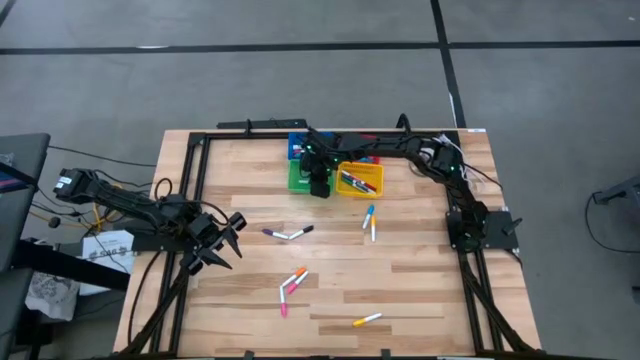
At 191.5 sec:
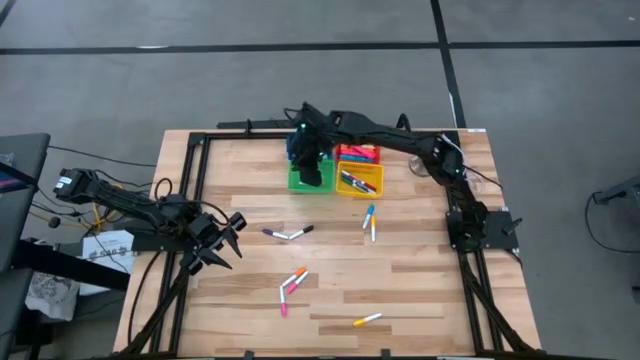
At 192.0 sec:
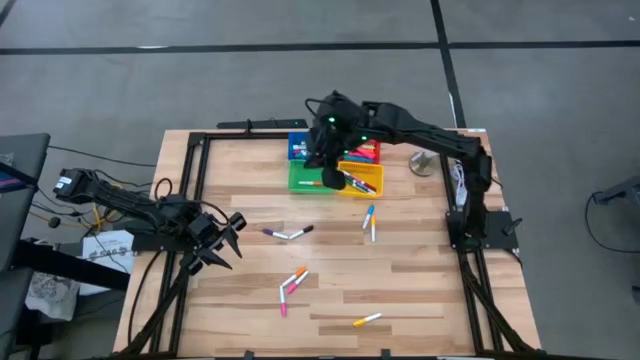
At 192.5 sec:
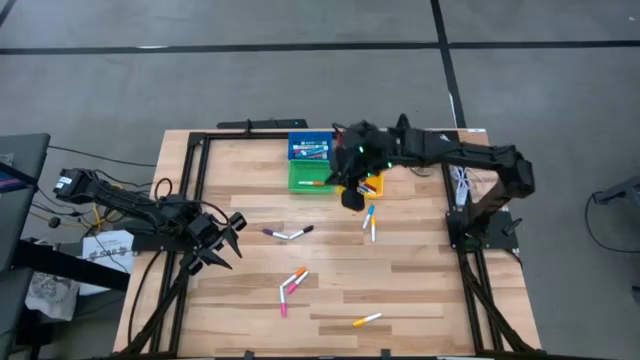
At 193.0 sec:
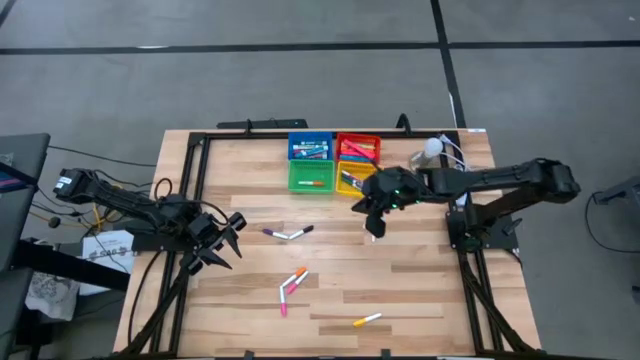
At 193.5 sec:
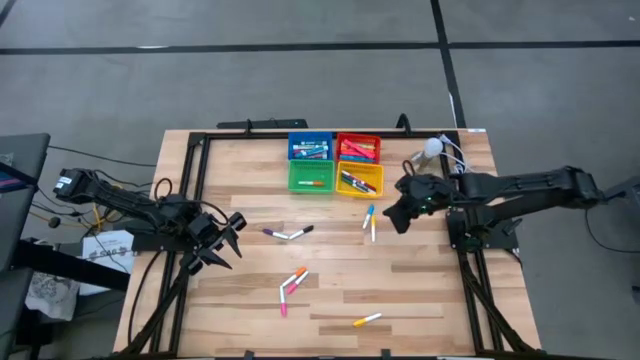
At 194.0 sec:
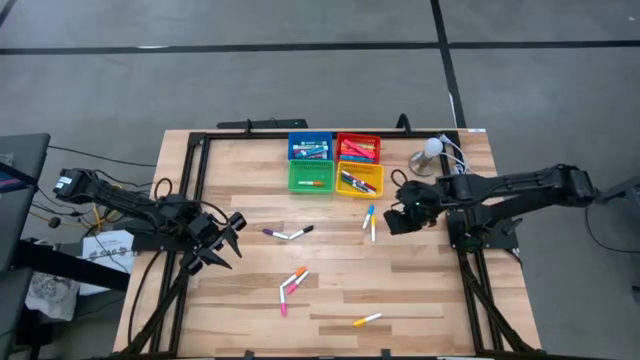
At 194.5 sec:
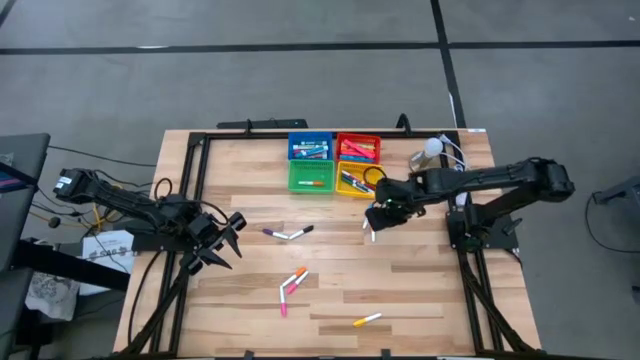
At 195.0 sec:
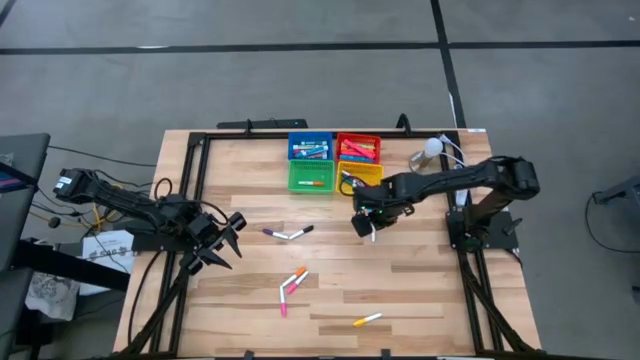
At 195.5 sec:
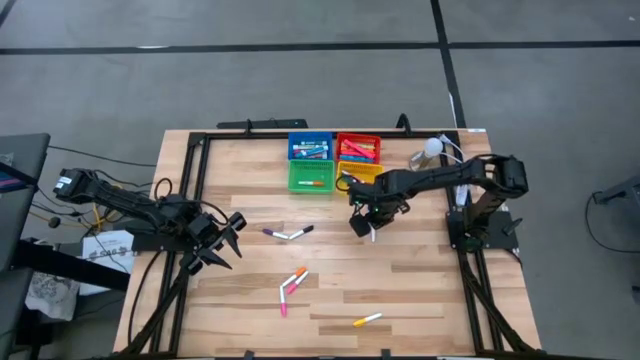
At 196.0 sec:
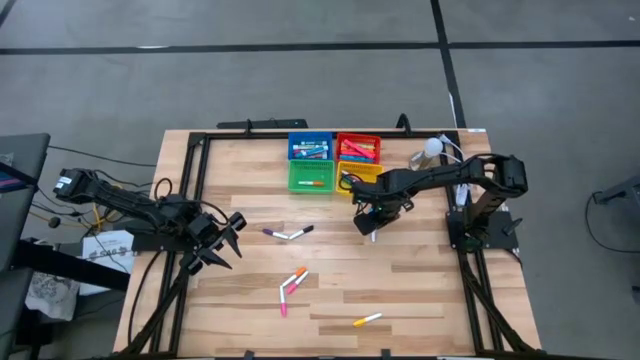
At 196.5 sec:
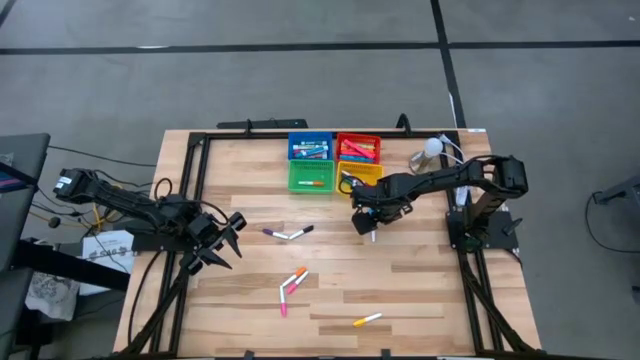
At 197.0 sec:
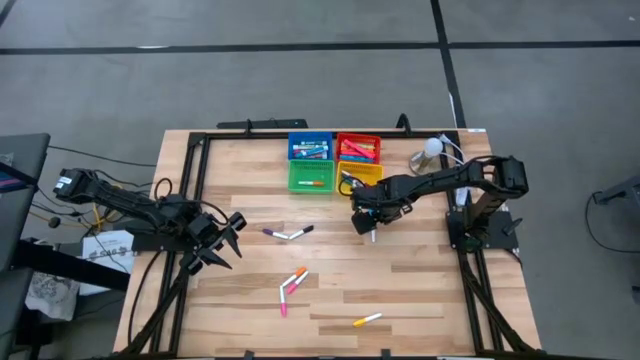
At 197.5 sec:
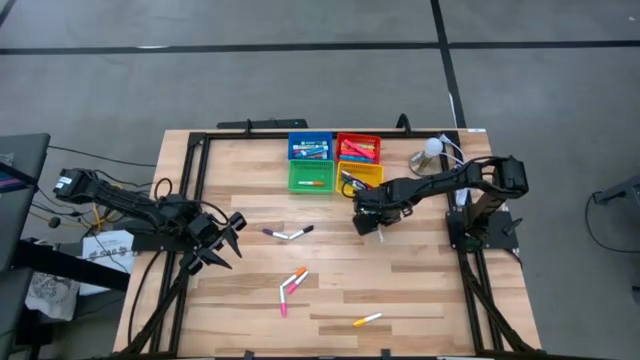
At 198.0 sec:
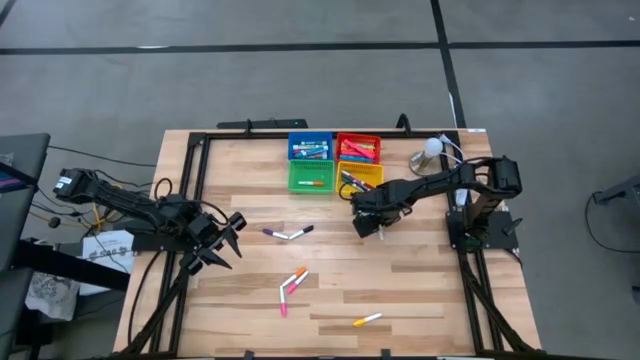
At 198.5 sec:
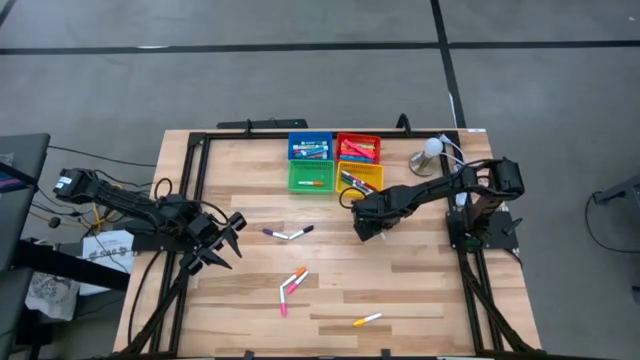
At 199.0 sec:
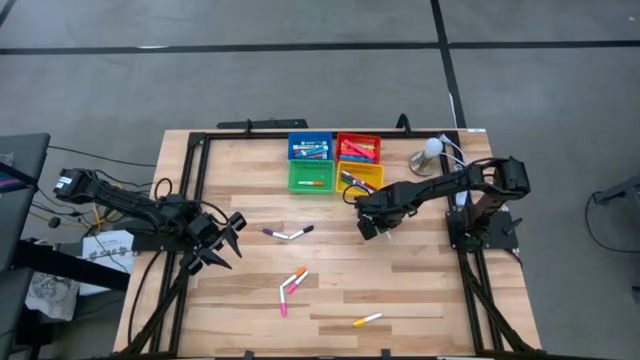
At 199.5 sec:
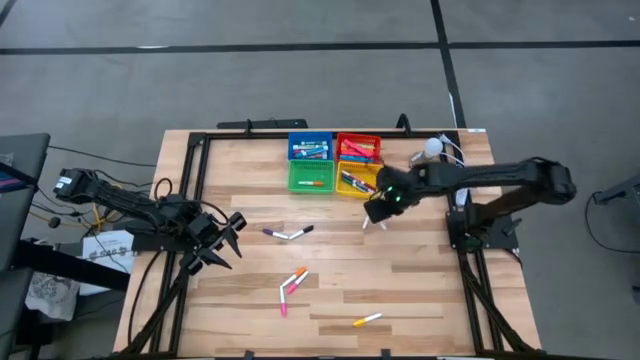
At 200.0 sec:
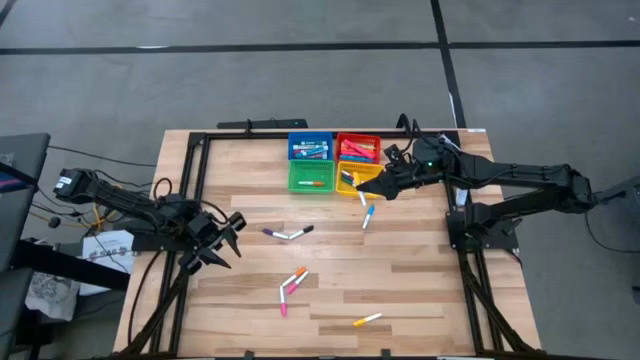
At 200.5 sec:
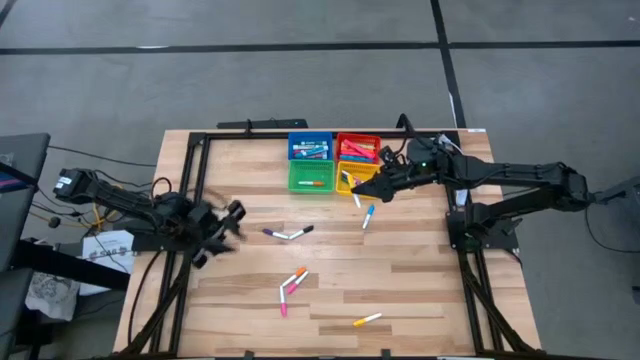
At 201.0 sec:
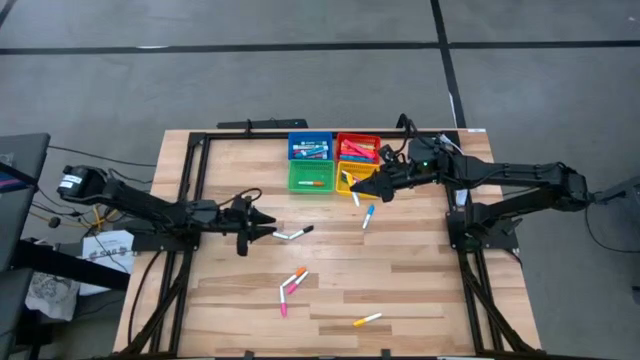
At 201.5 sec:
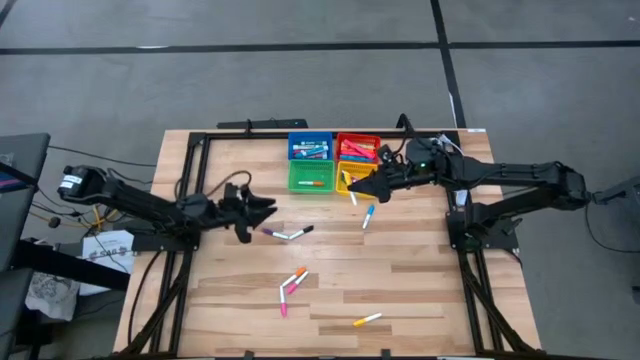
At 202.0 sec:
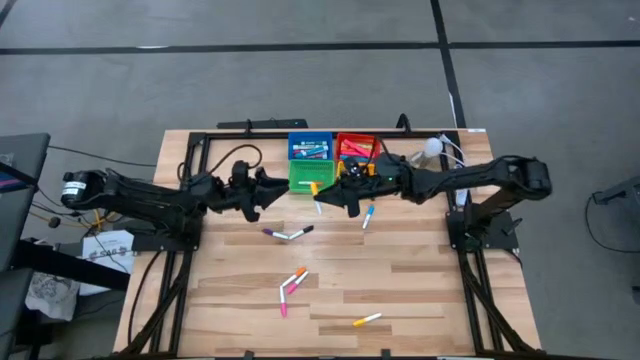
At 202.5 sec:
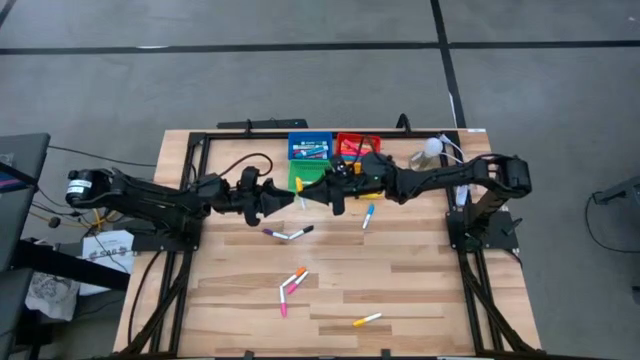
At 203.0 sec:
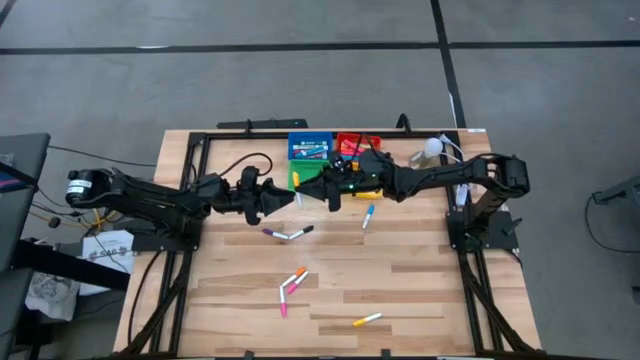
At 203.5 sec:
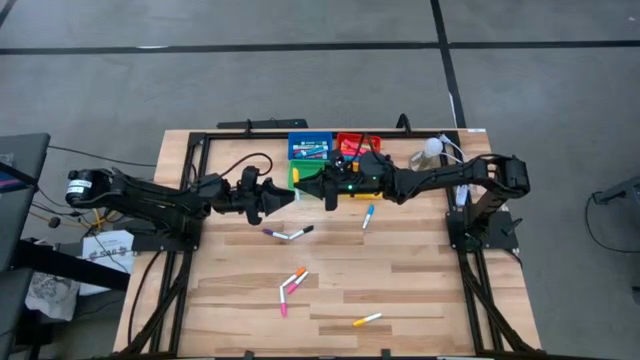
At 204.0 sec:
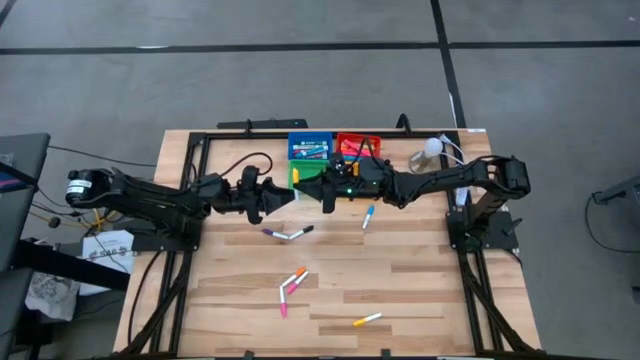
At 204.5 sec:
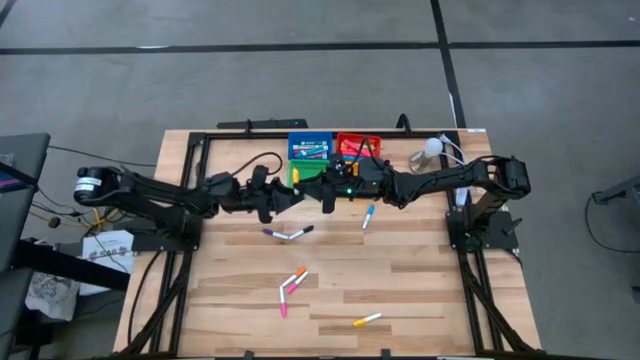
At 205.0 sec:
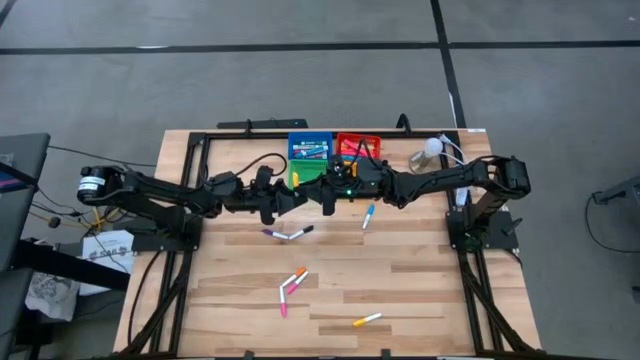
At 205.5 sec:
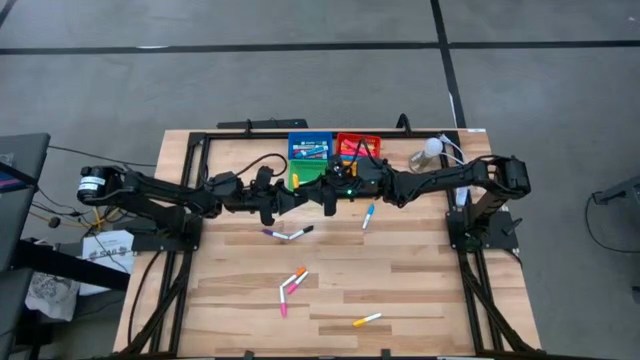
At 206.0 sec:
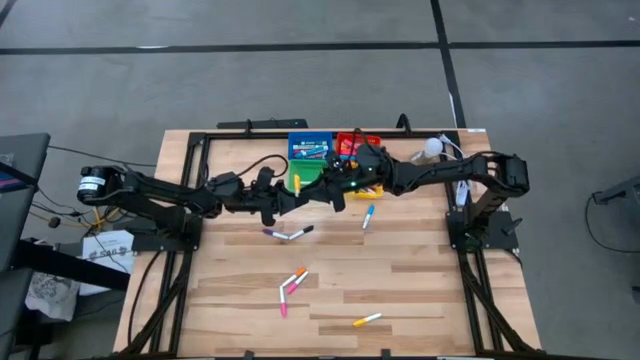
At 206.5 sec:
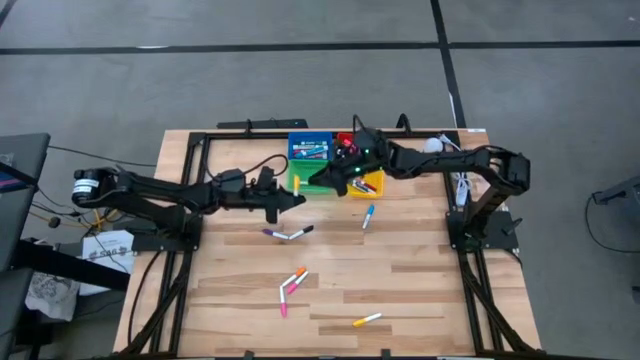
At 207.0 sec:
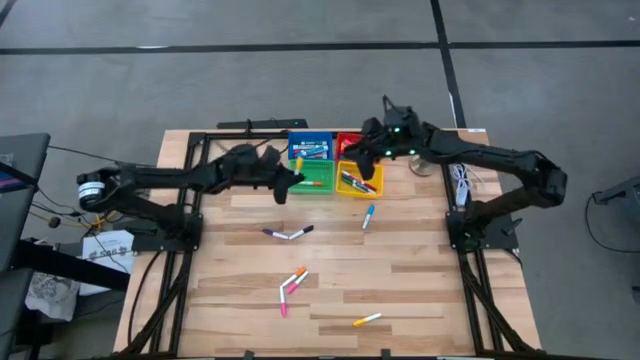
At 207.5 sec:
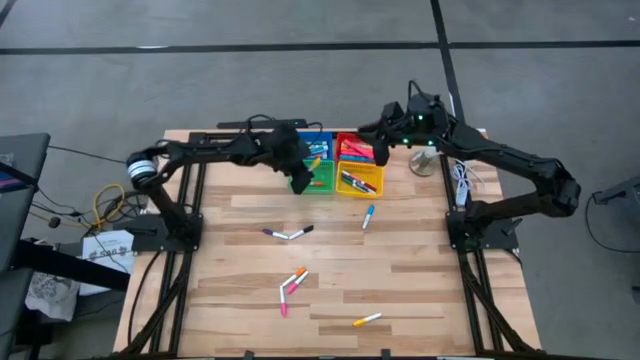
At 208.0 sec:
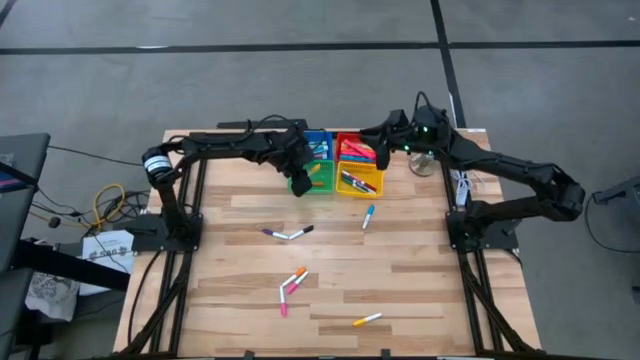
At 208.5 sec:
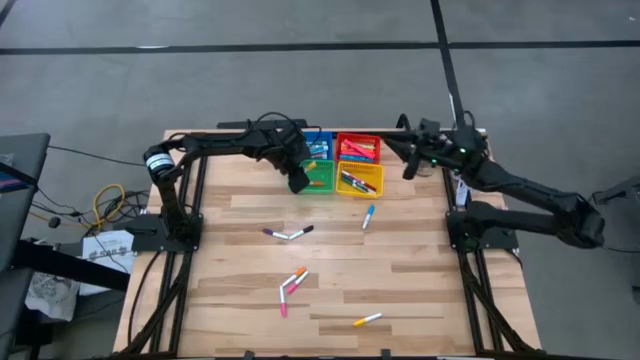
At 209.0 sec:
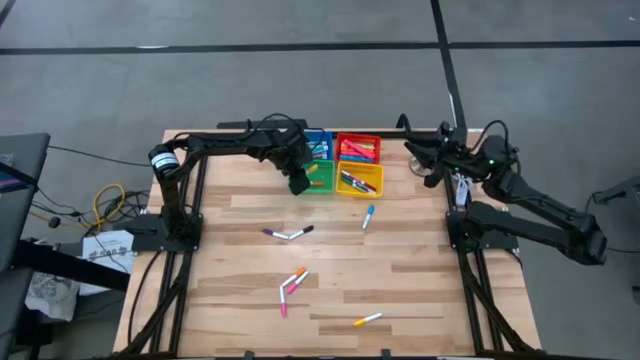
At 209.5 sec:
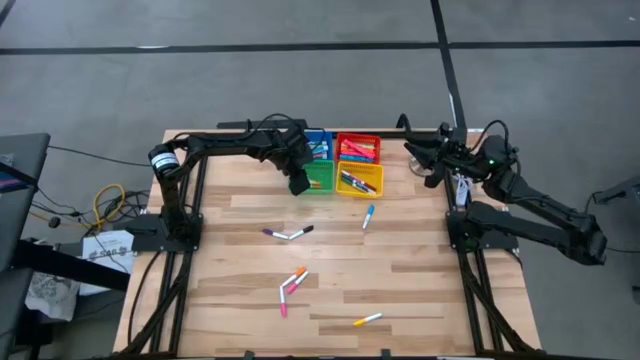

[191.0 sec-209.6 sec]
Task: Pick & Place Markers
Put the yellow highlighter in the green bin
